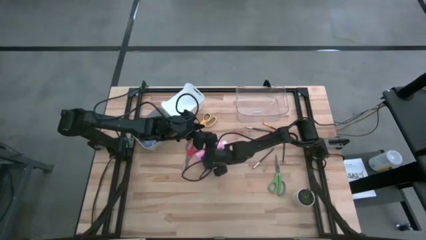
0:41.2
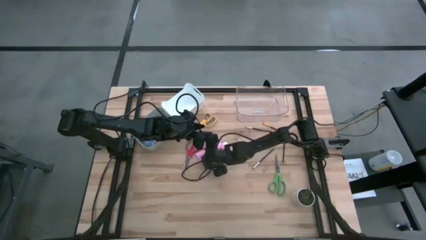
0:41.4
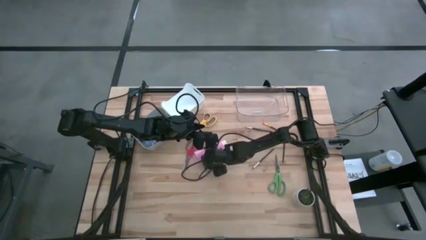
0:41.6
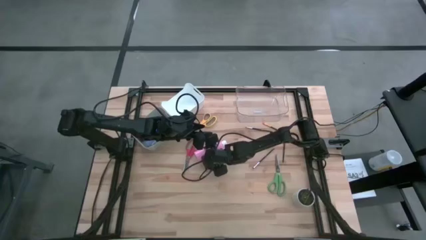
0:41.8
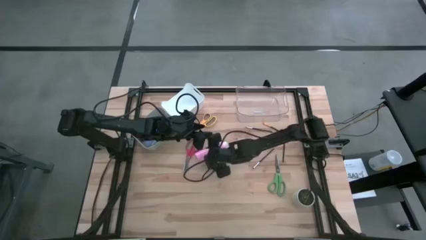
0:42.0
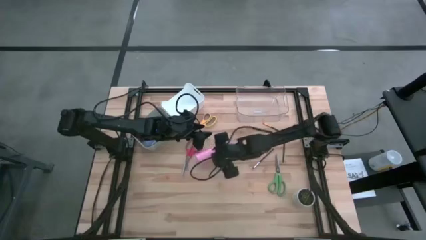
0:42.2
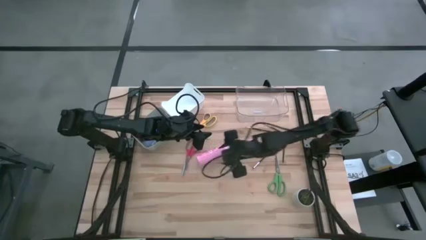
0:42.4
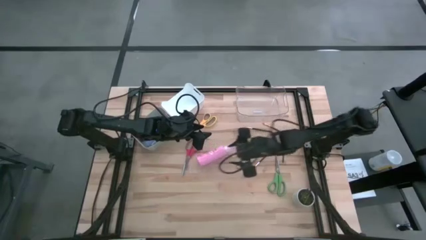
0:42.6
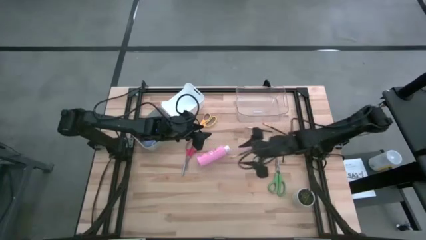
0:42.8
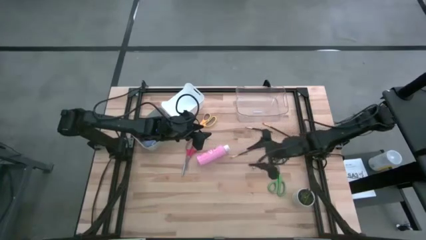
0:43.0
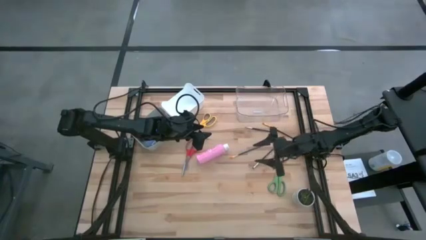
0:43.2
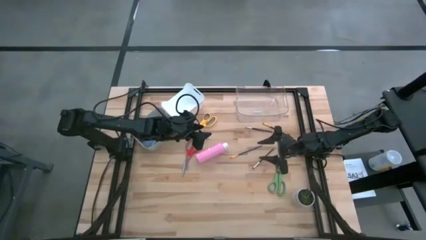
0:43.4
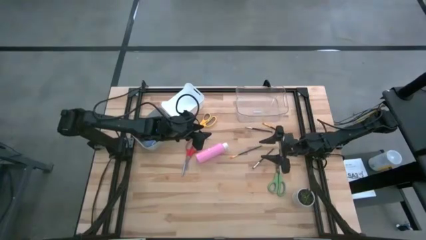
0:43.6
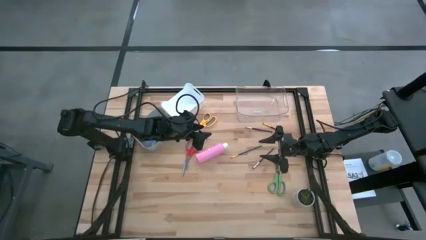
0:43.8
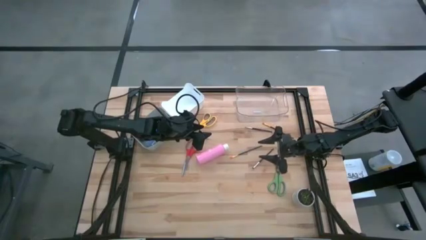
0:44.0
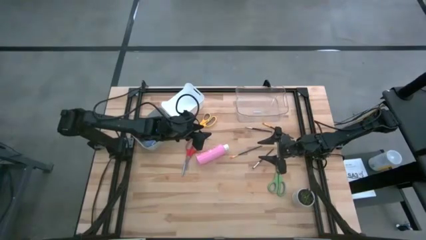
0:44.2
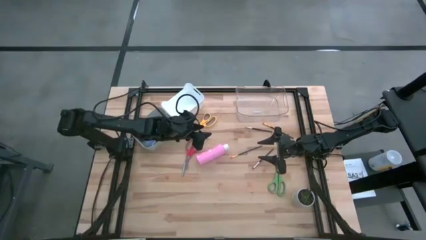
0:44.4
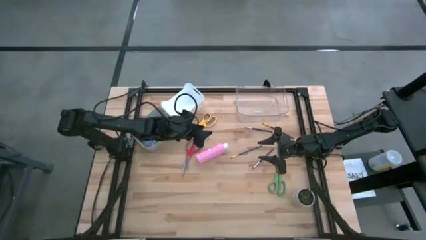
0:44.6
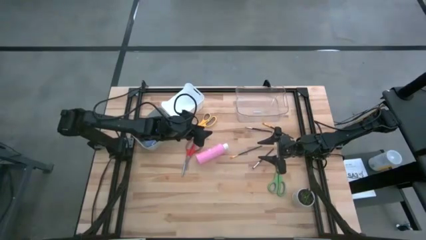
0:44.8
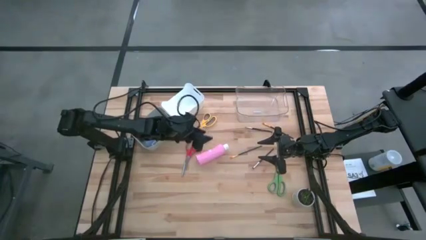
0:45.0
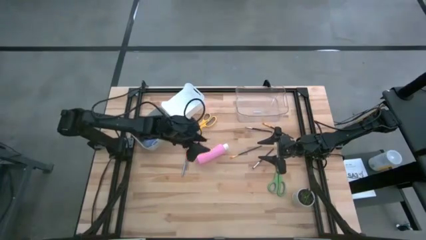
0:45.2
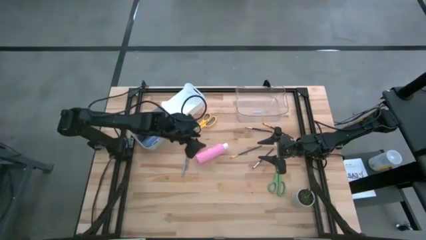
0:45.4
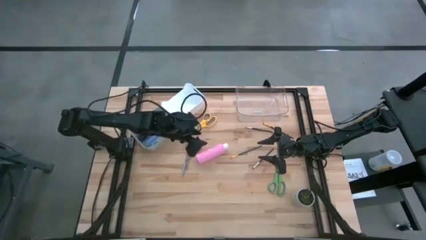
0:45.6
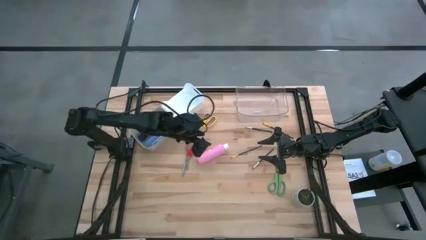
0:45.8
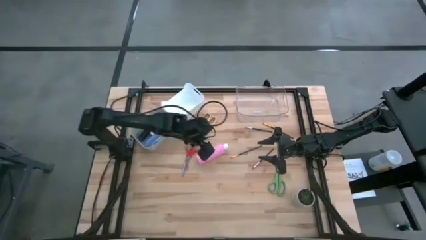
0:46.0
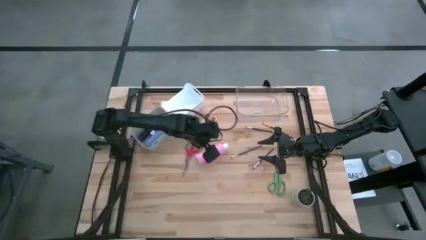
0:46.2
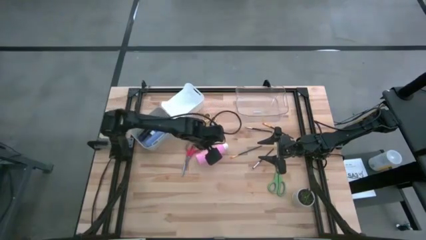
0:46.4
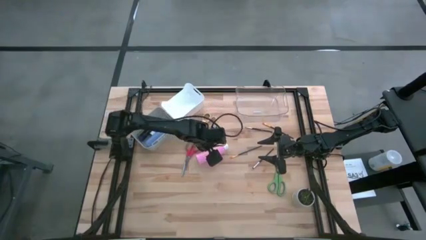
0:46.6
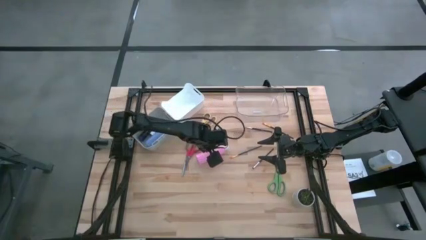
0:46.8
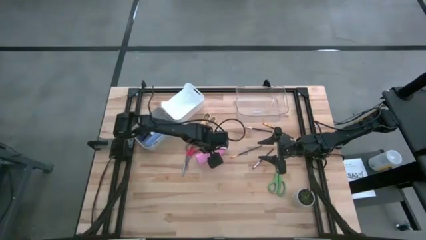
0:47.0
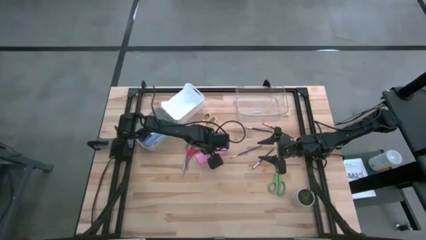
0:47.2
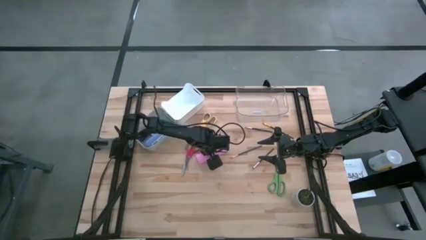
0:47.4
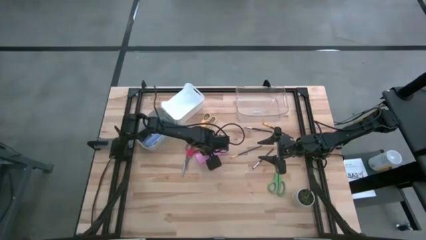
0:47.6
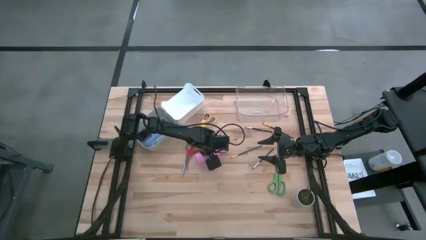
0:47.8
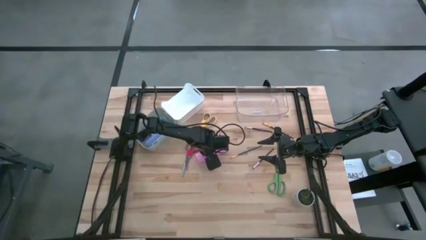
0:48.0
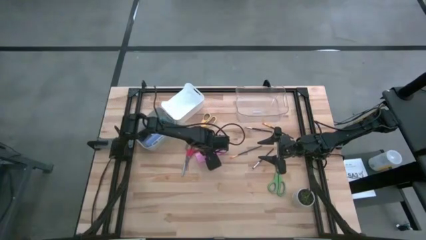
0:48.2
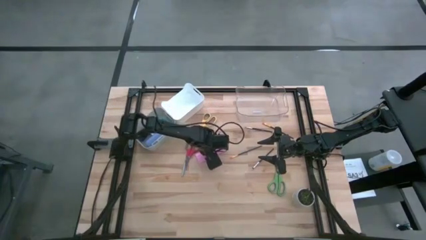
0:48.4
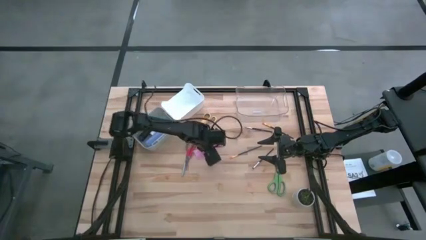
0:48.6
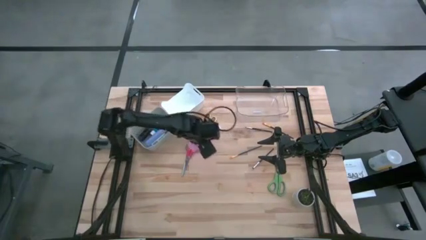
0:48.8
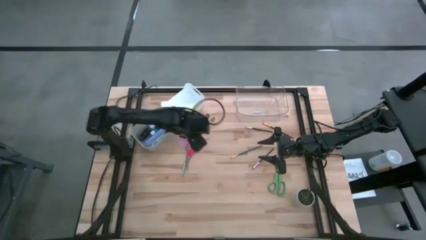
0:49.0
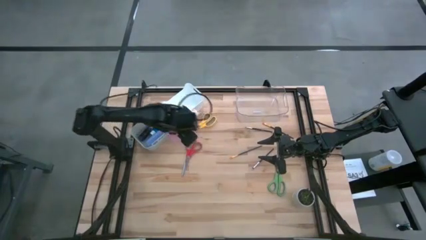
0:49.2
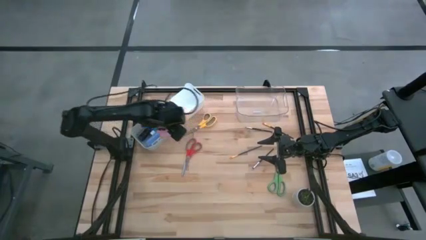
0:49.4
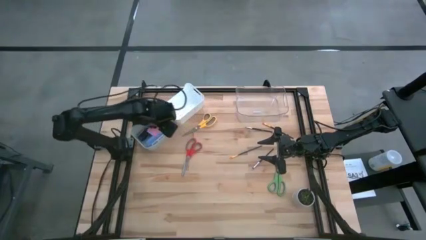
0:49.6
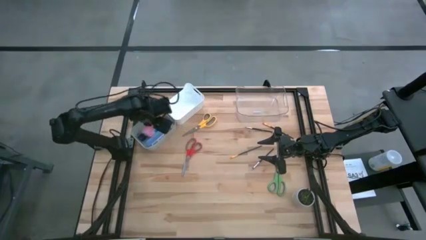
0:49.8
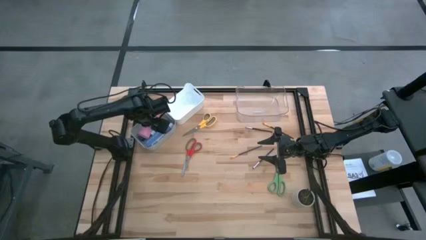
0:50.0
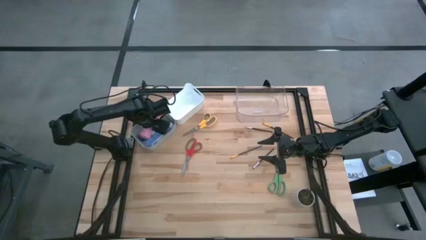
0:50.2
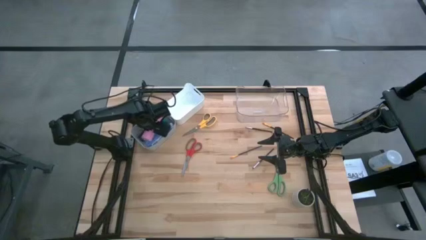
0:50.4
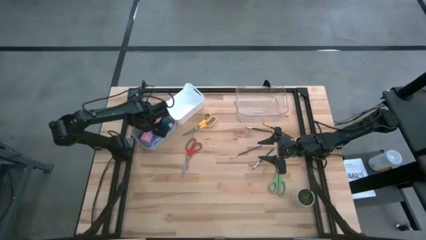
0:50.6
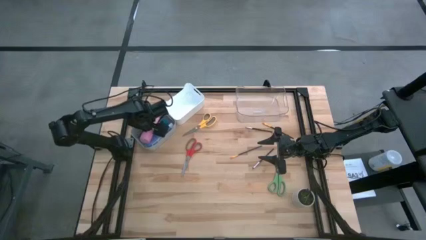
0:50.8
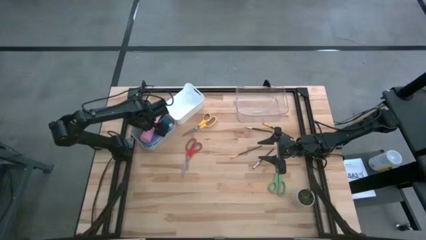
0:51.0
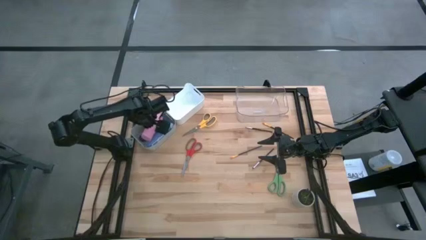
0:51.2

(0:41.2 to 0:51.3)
Task: Pick & Place Paint Supplies
Put the pink paint bottle into the gray bin
